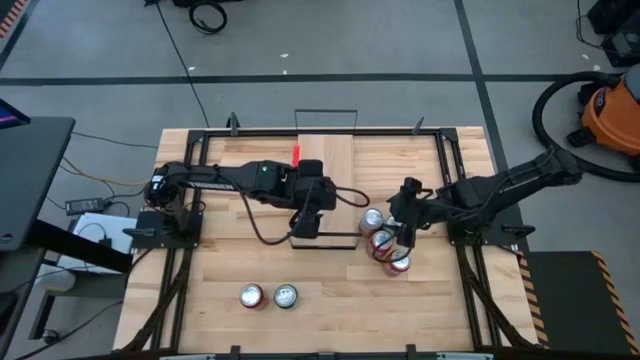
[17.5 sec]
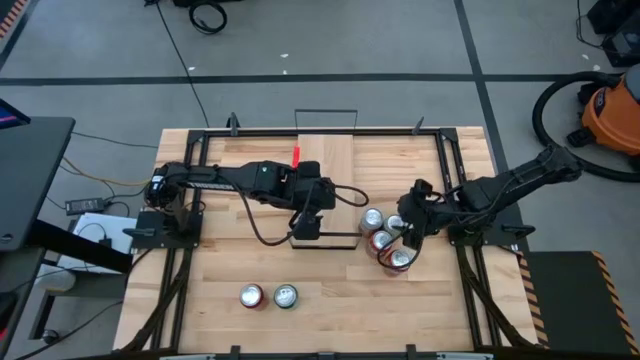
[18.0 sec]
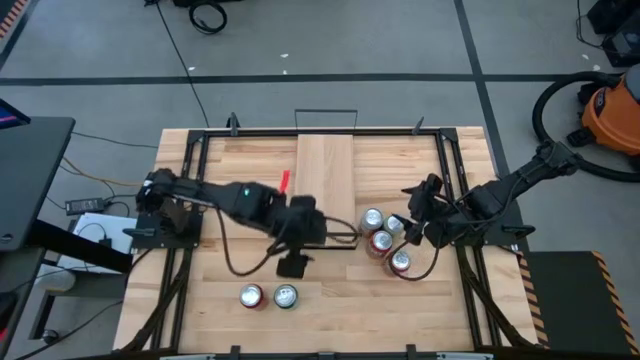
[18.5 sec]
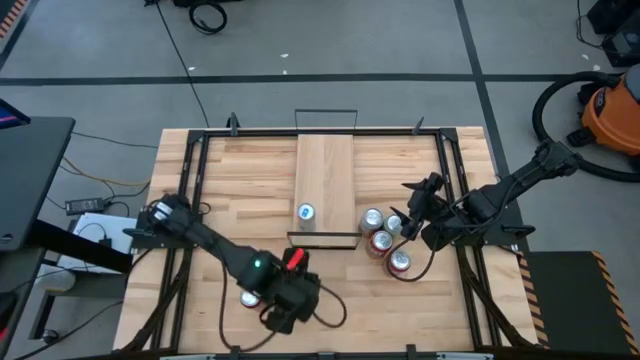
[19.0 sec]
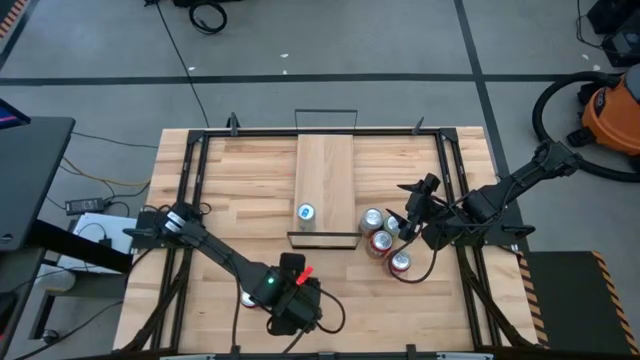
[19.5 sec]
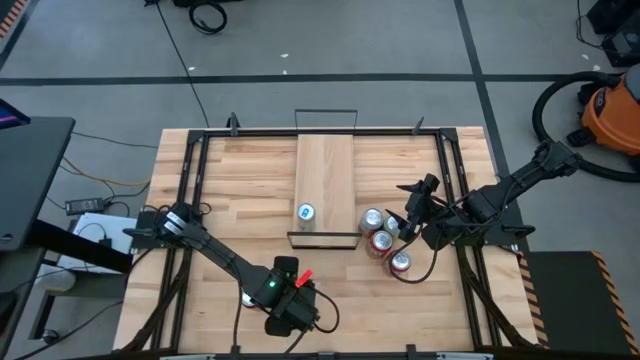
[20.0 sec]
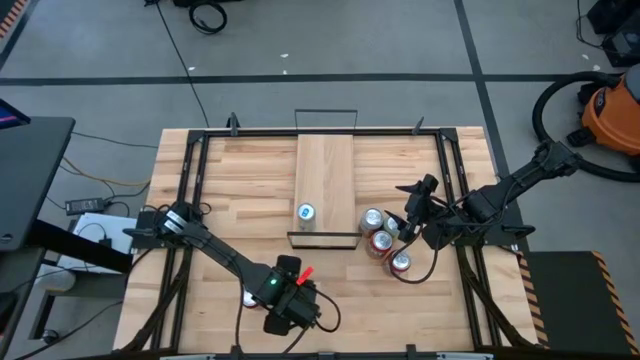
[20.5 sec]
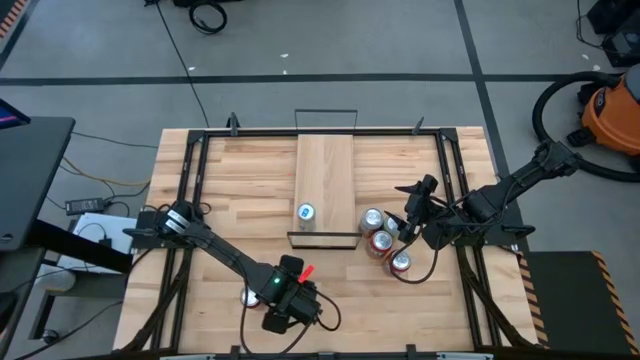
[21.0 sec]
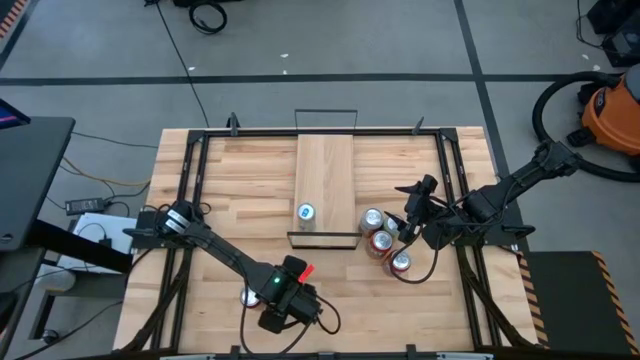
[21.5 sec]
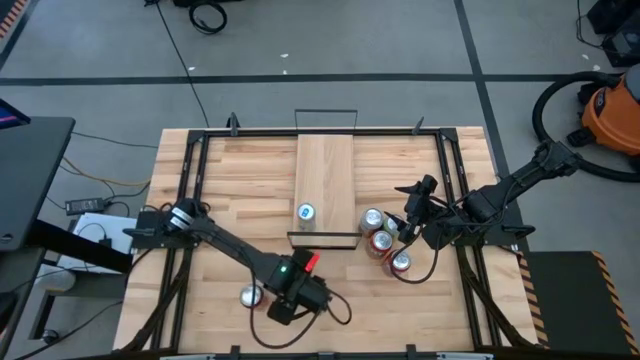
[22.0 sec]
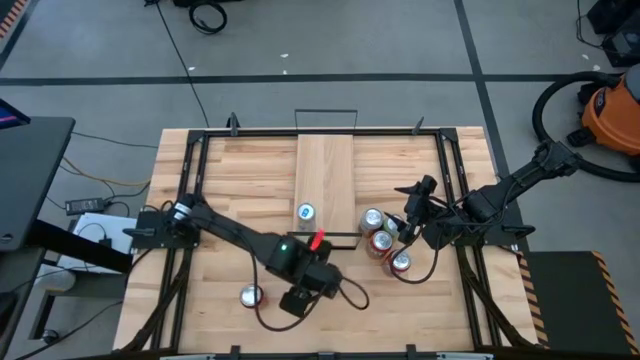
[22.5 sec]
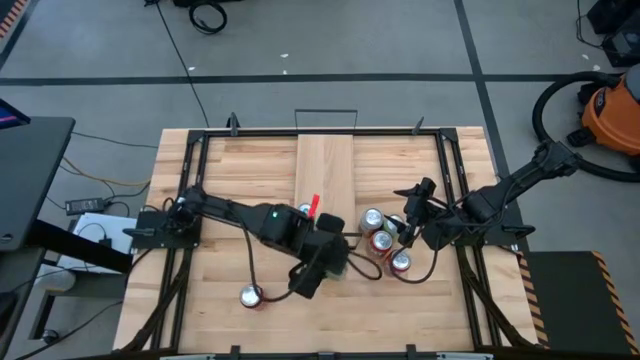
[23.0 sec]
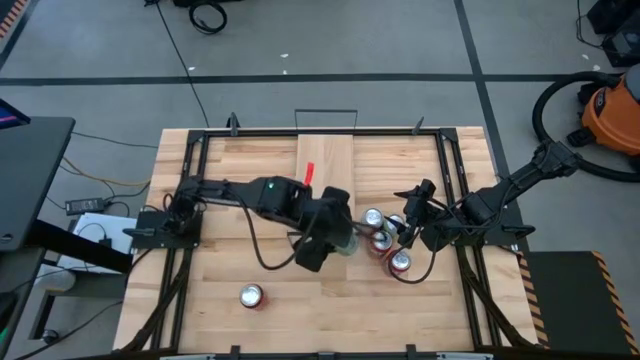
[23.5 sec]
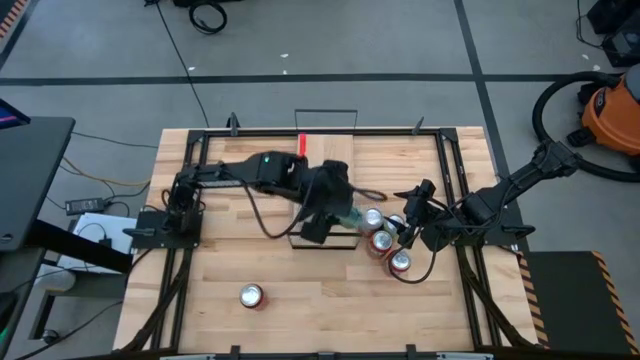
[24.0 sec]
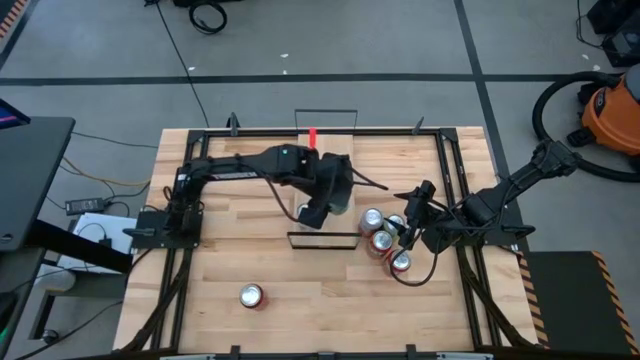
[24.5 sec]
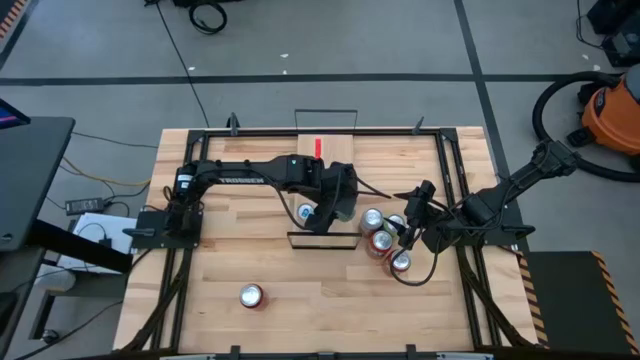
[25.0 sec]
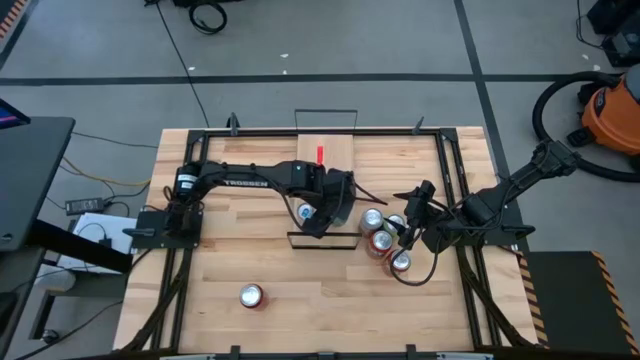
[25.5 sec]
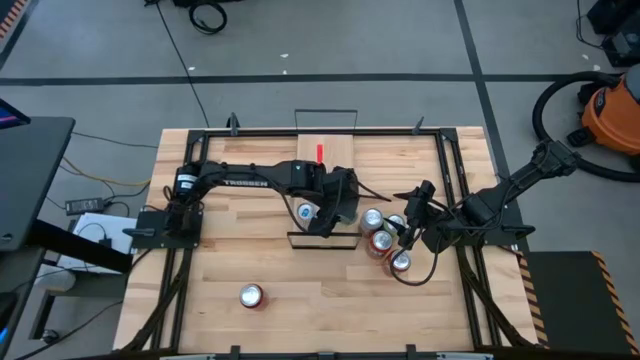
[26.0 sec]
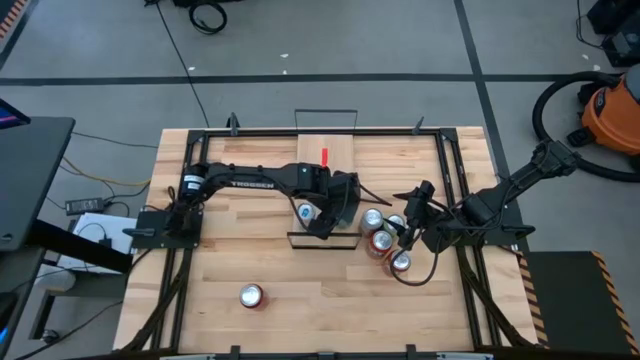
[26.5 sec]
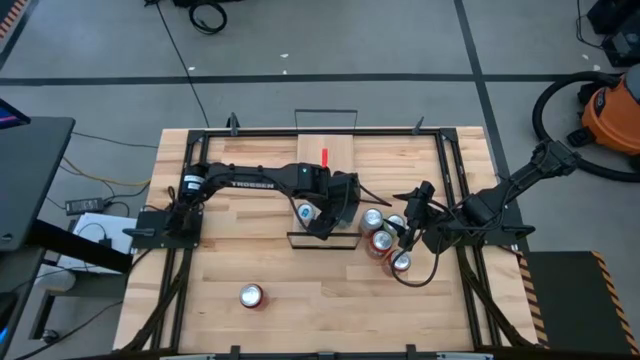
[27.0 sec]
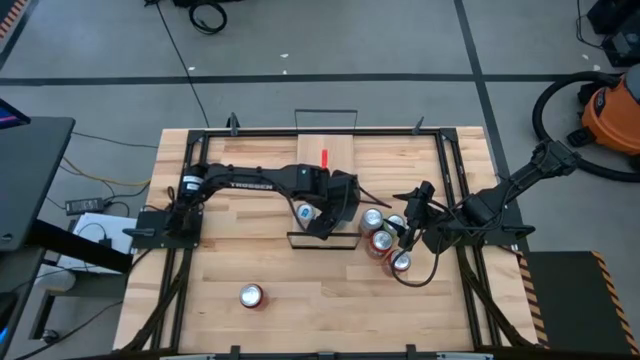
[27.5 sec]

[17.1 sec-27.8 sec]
Task: Place canned beverage on shelf
Put the green soda can on the shelf

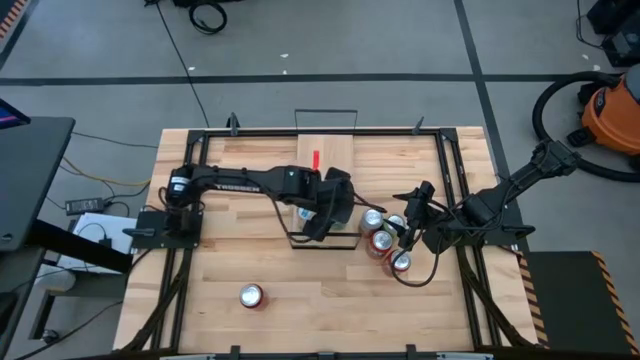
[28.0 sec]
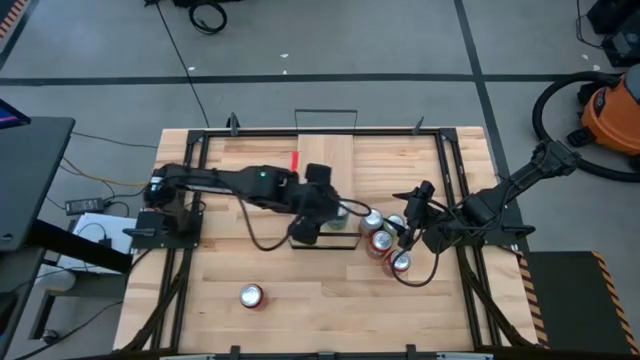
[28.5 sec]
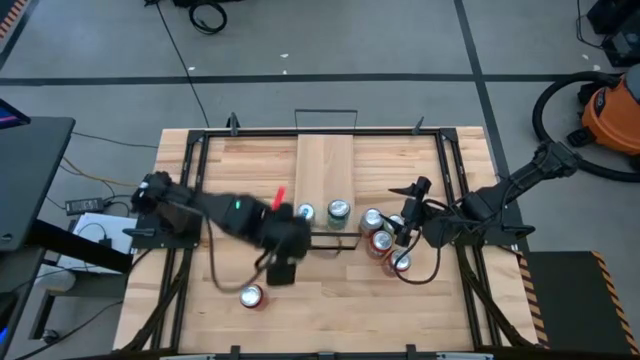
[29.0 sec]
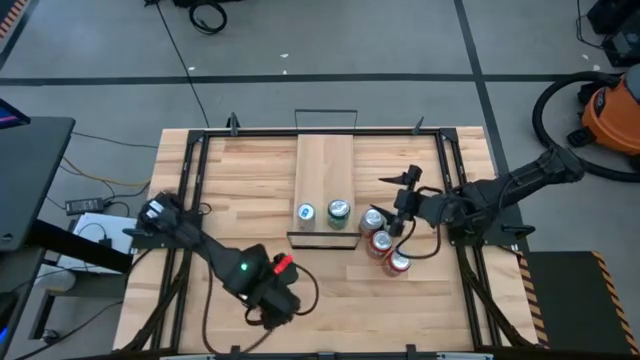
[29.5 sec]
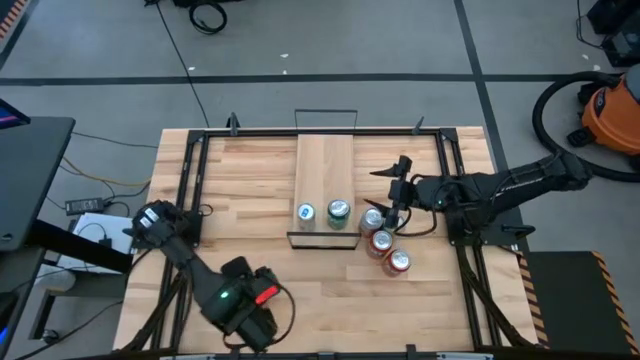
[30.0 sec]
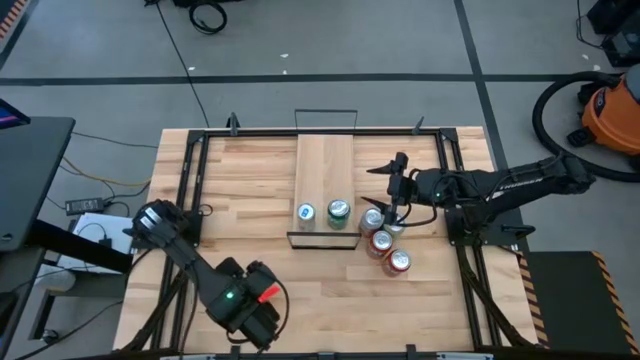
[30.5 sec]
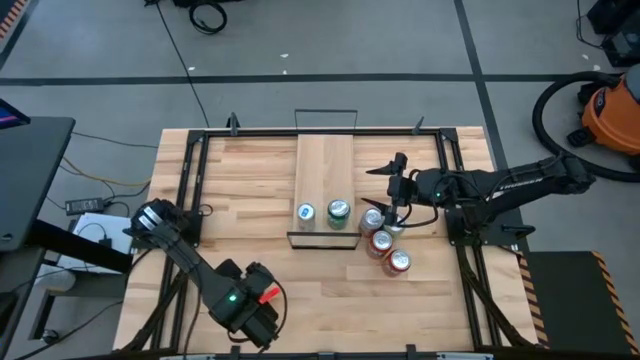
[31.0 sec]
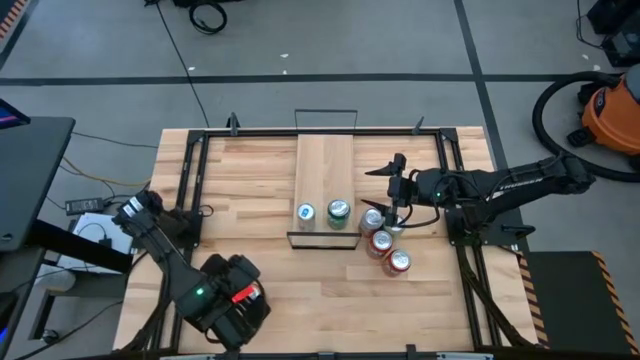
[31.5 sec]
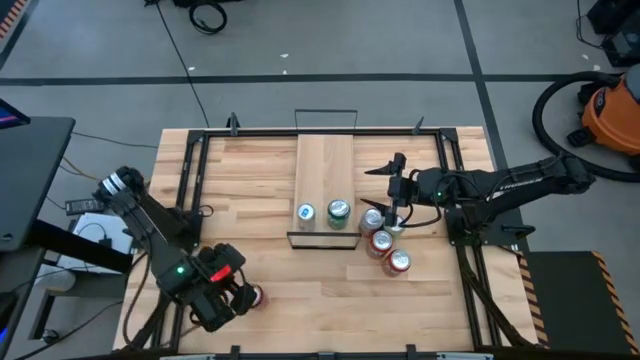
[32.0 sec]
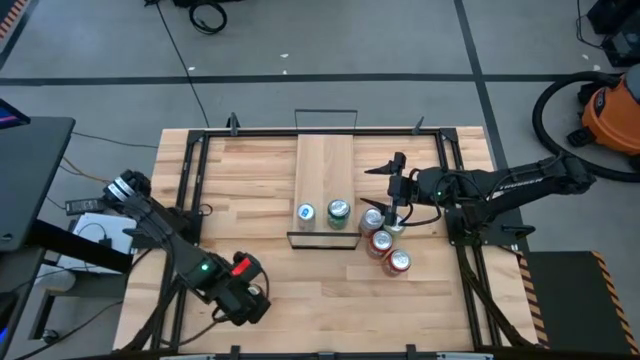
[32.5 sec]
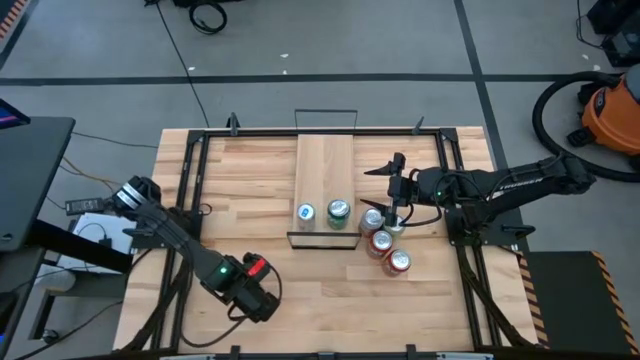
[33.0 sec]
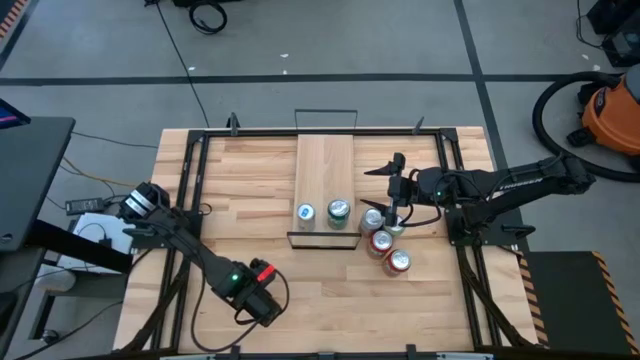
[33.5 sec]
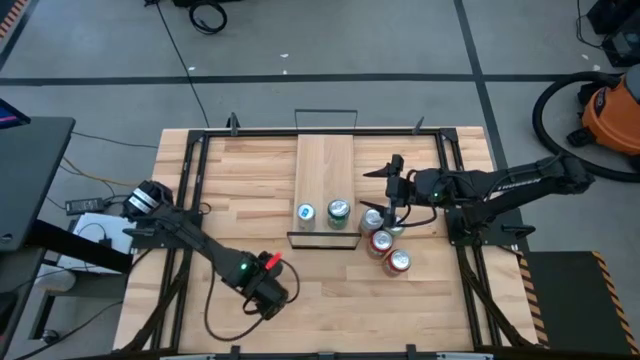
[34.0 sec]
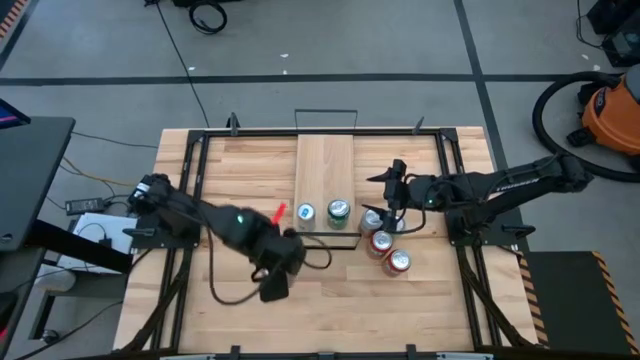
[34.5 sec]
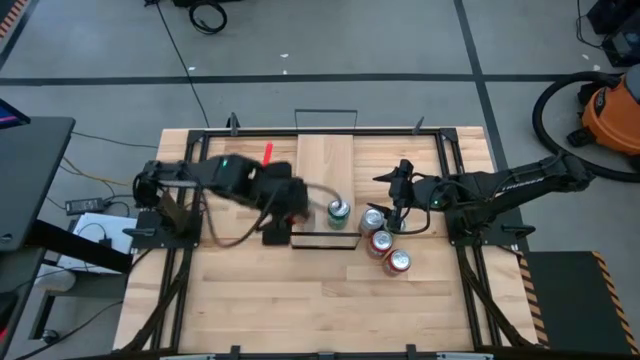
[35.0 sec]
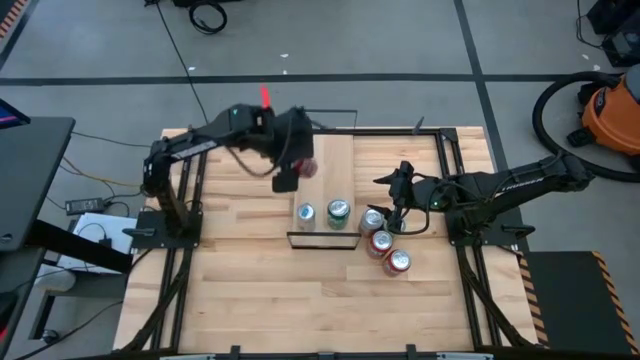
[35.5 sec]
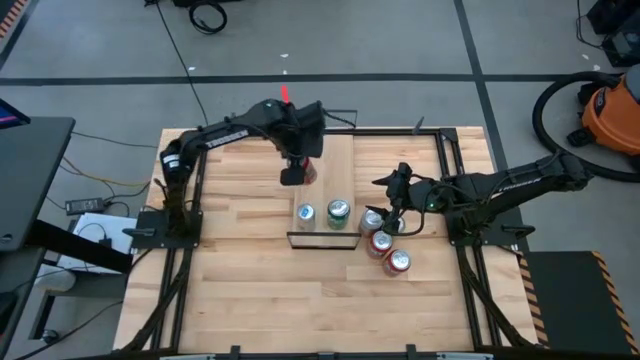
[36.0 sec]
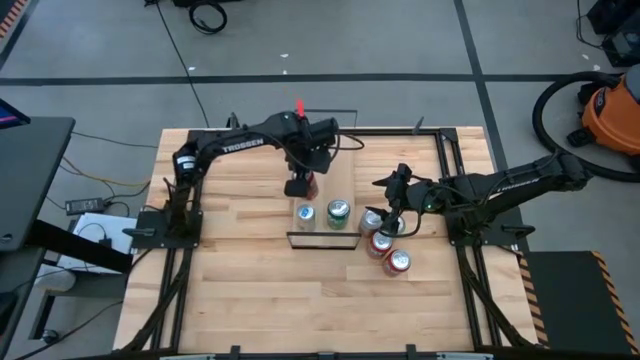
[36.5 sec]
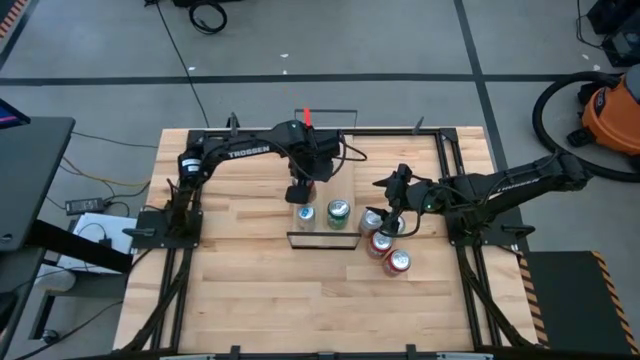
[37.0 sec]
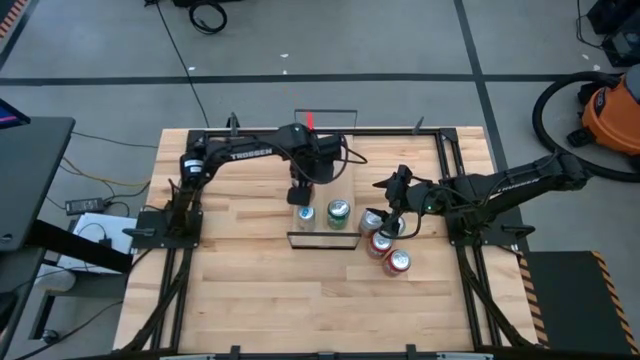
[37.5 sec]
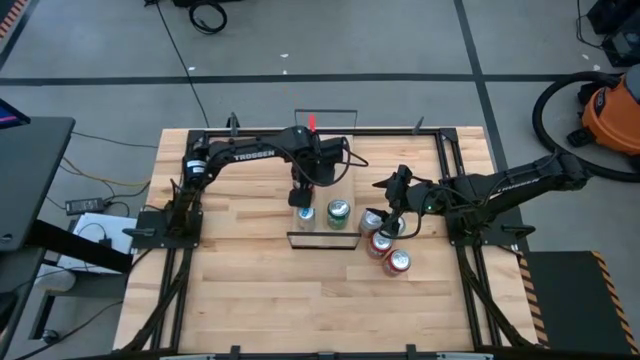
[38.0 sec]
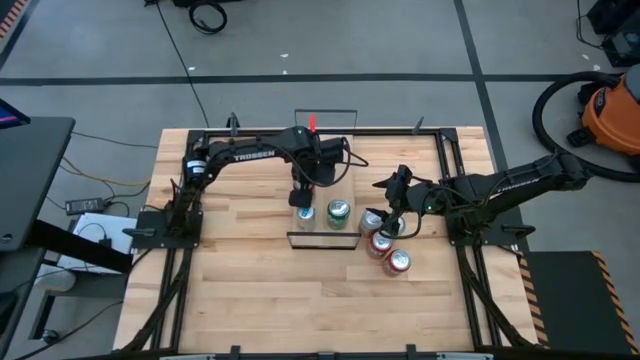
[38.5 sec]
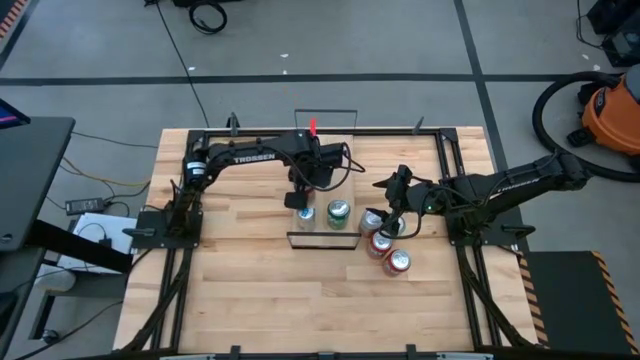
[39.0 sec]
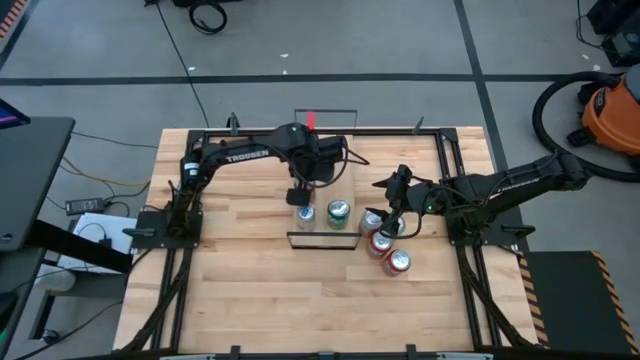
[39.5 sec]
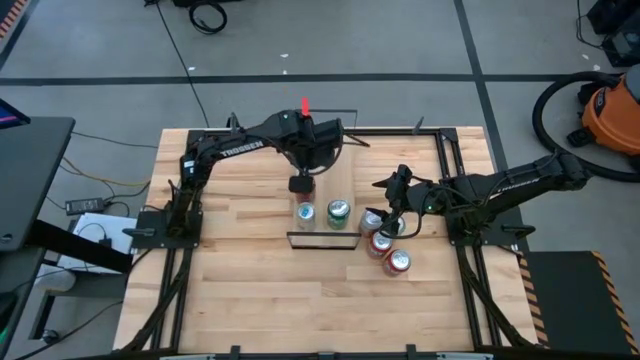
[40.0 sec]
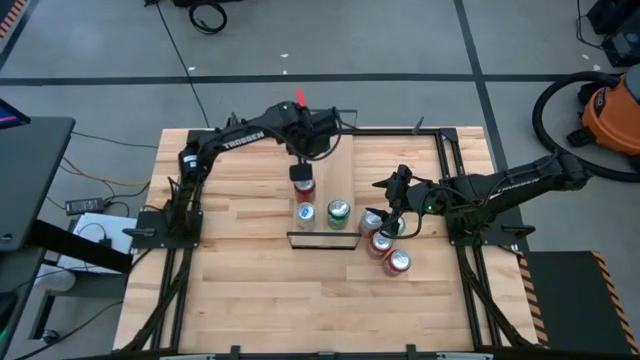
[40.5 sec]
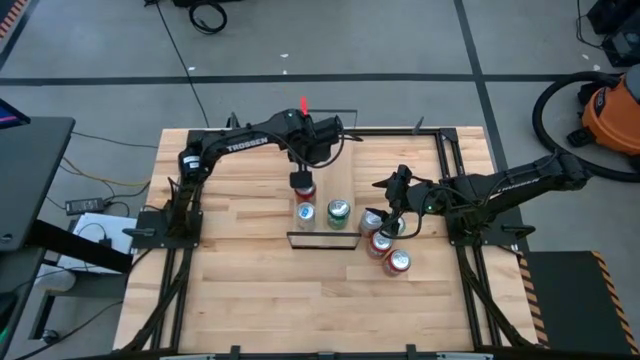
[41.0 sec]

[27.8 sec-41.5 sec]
Put the red black soda can on the shelf
